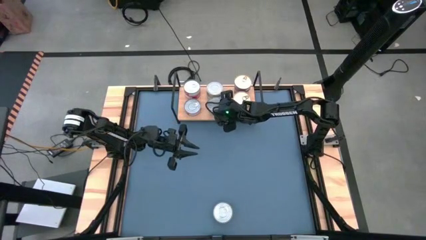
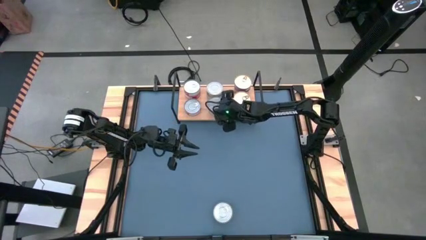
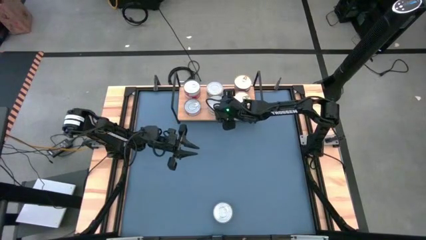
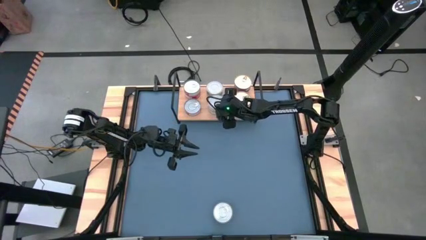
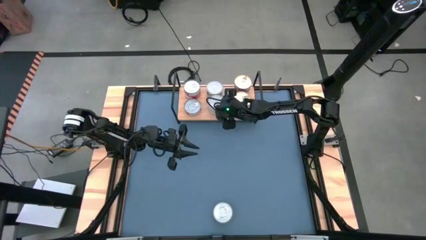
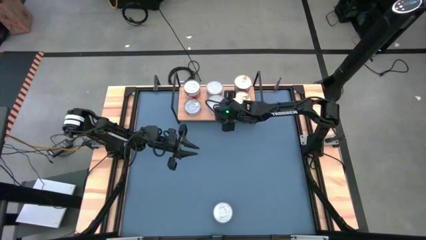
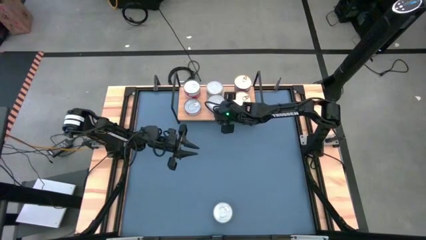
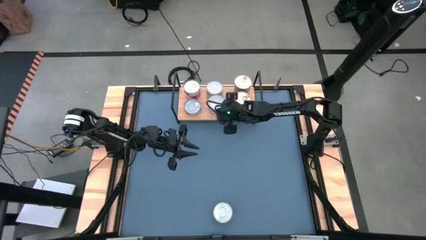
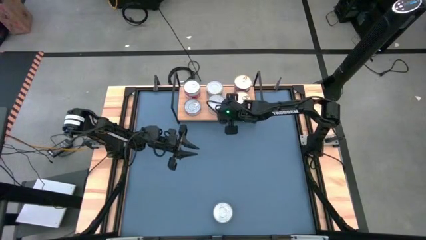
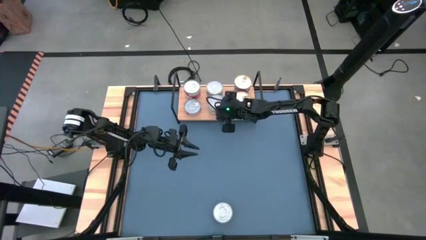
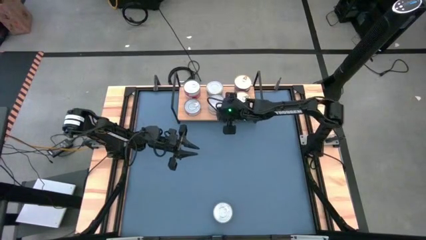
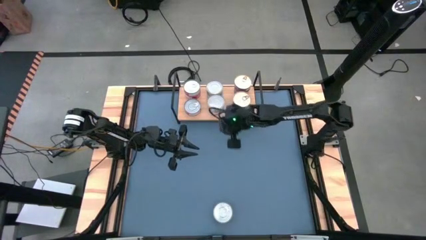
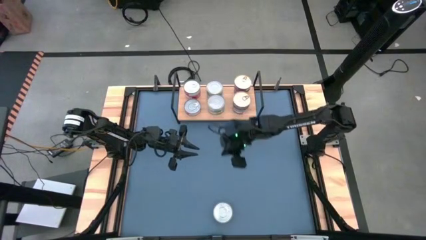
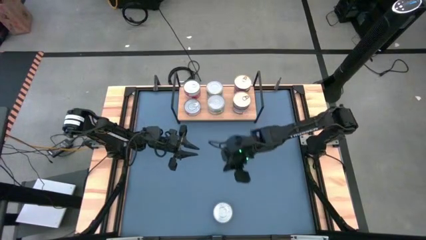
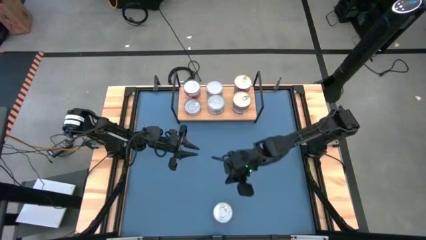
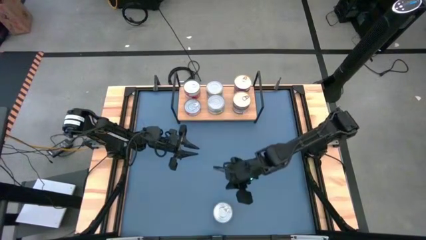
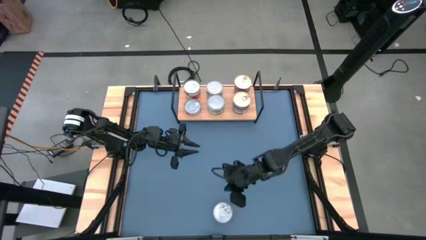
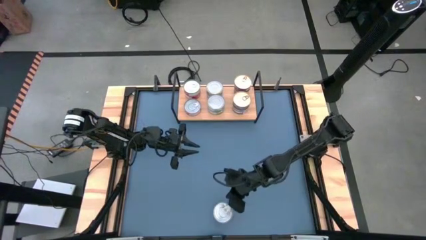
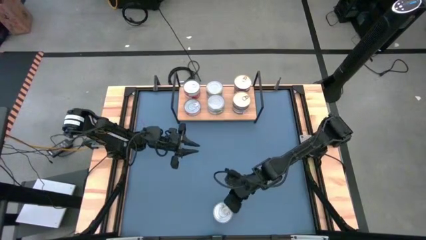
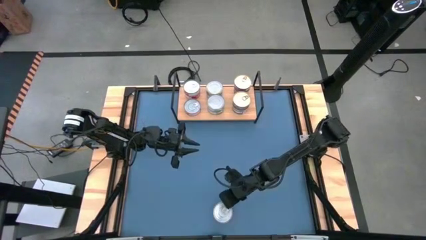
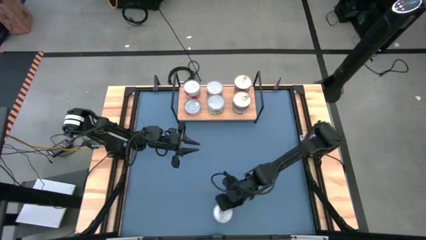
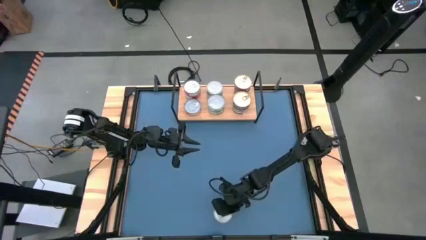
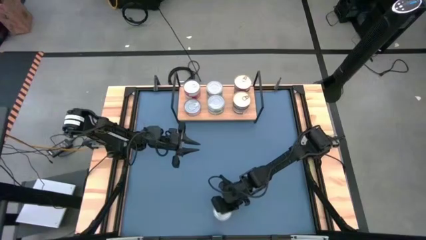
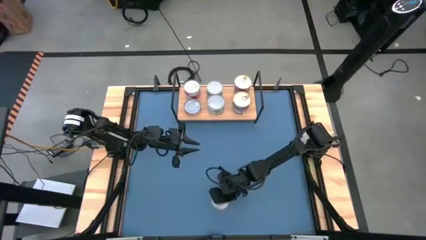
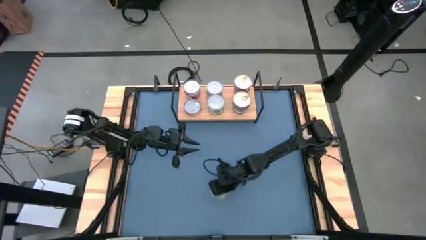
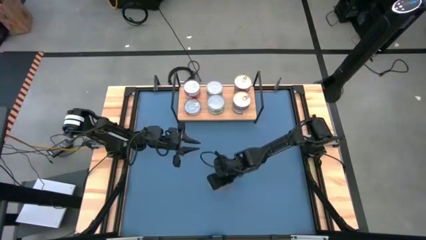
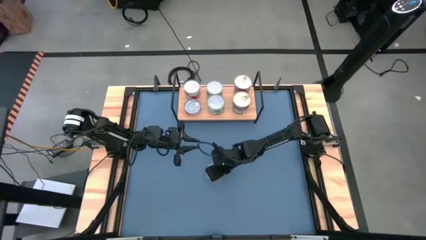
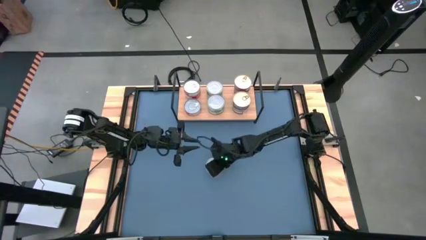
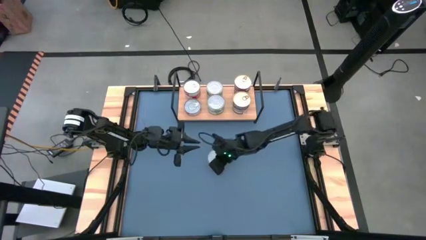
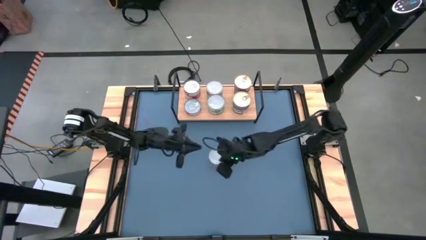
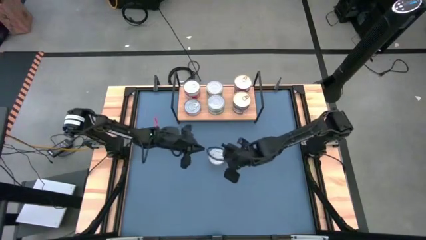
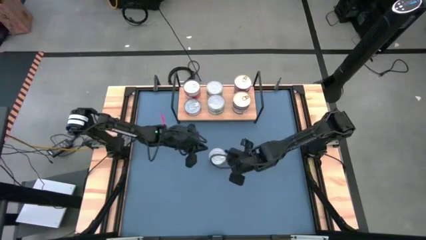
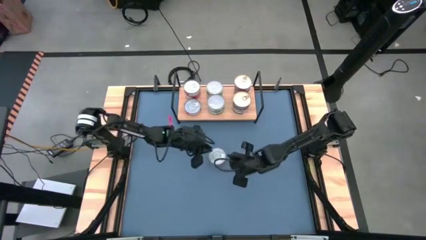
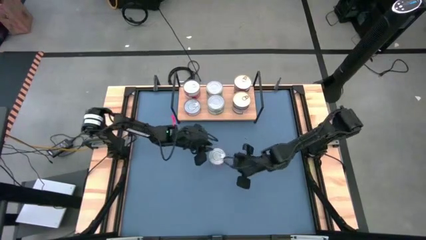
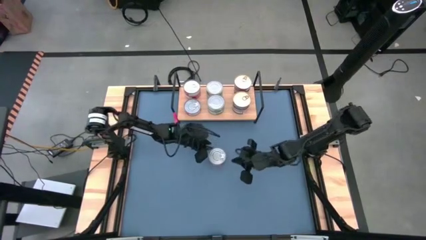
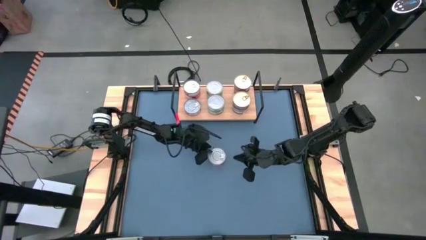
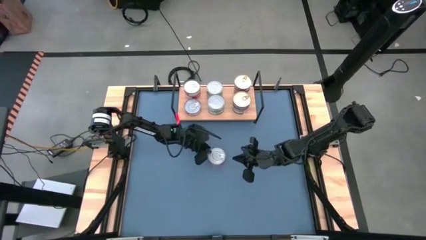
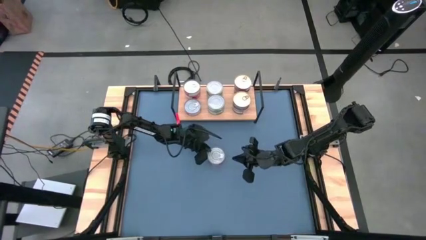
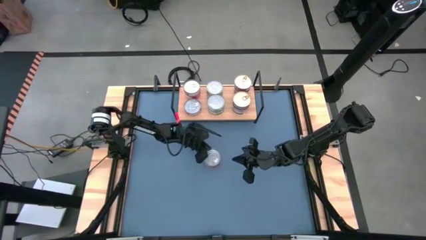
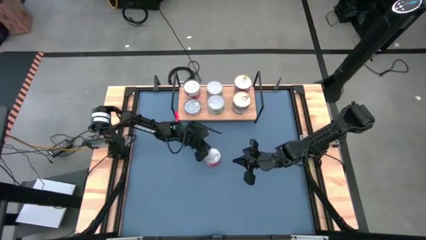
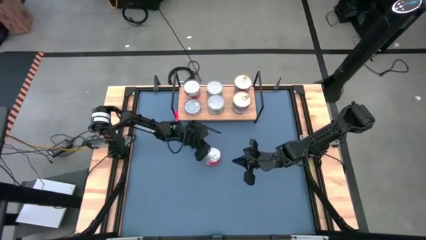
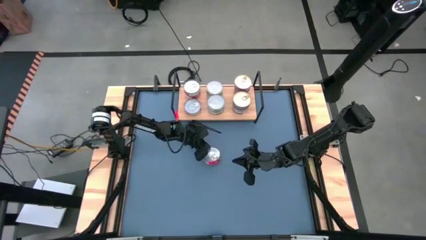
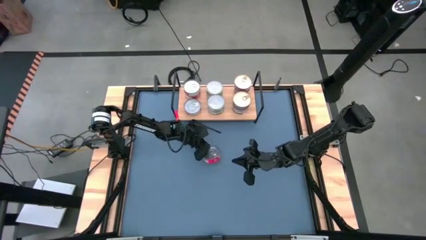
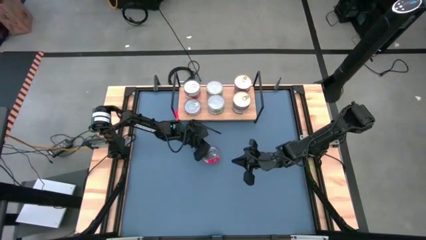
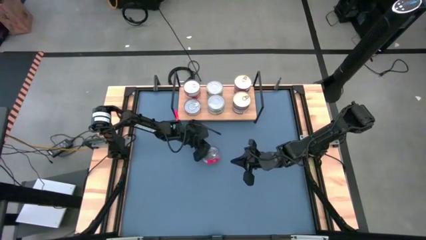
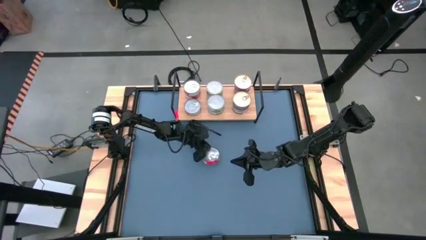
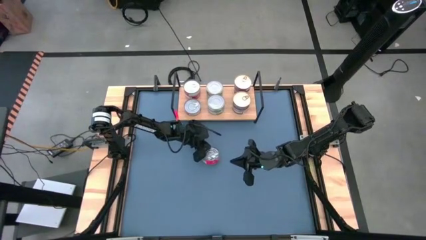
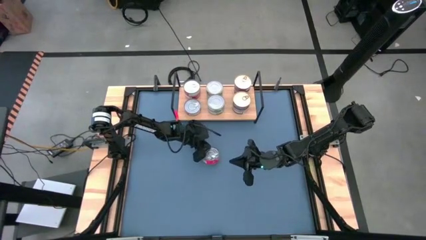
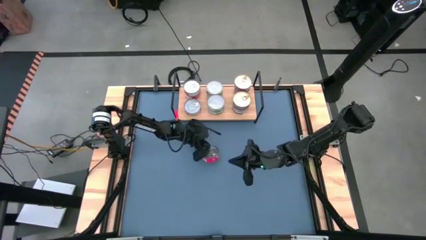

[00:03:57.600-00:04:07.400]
Task: Stack canned seafood by type on shelf
Stack the red tuna can on top of the red tuna can on the shelf

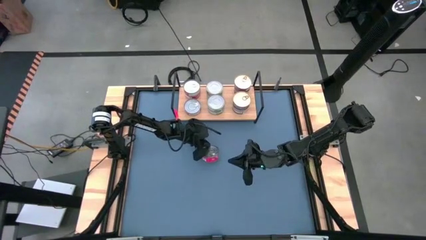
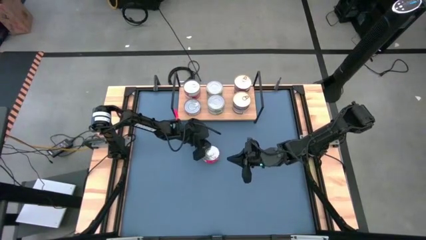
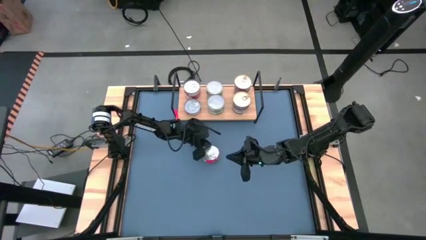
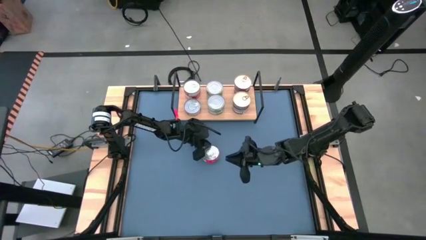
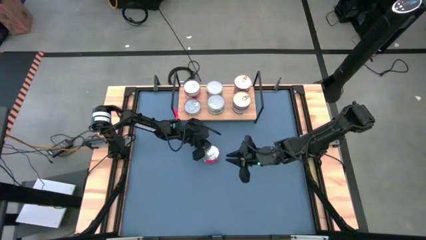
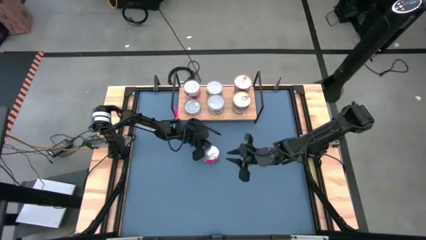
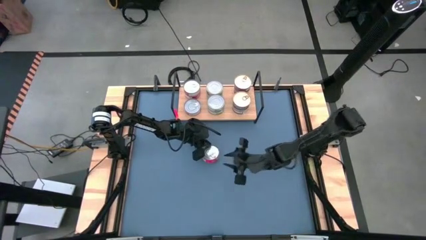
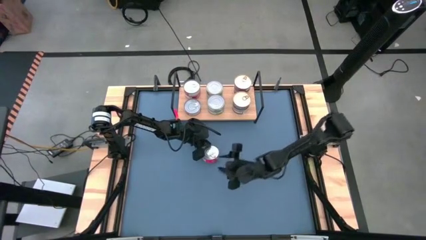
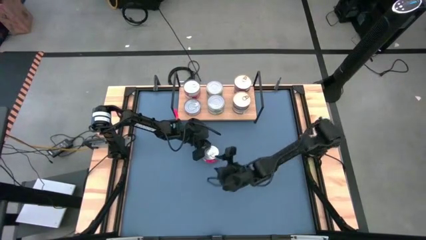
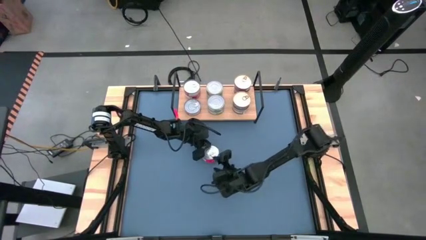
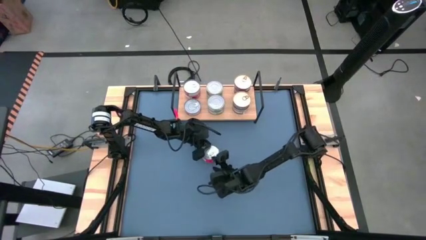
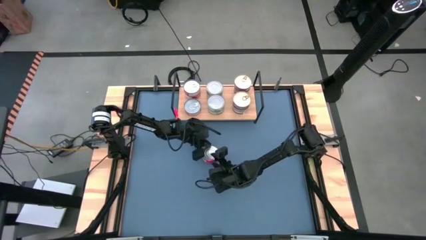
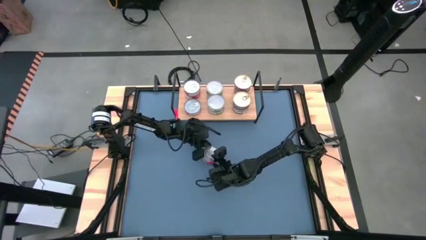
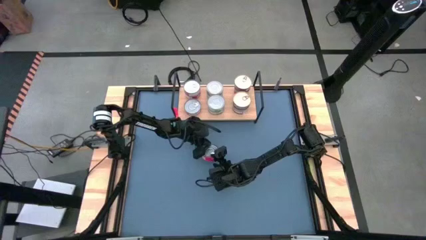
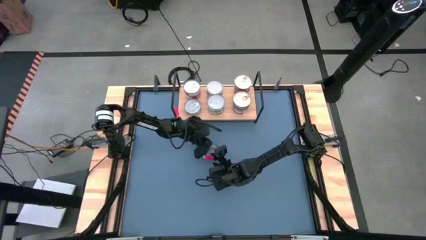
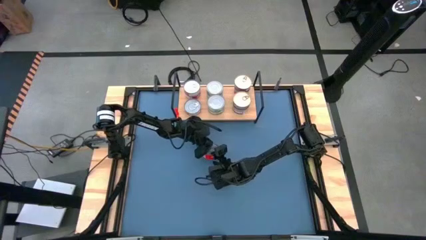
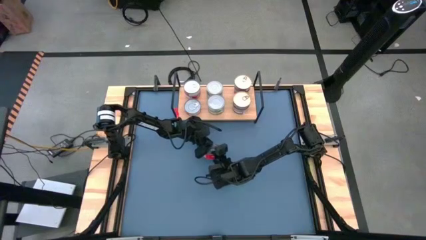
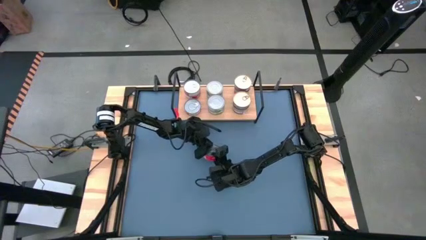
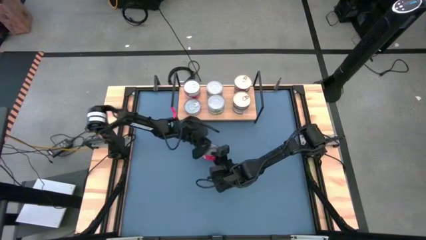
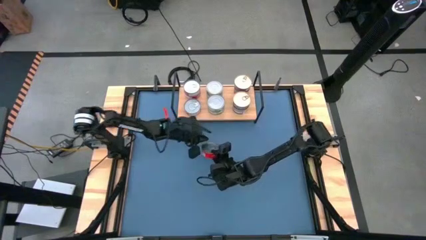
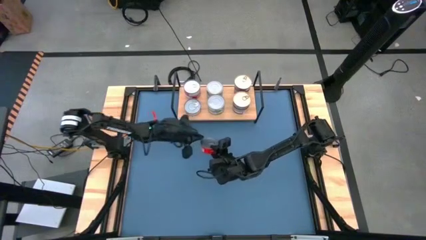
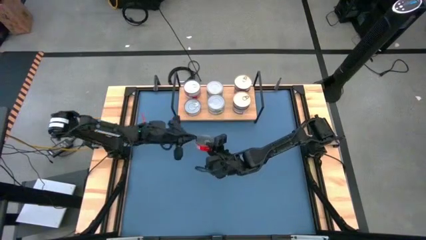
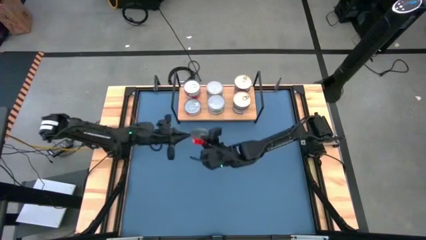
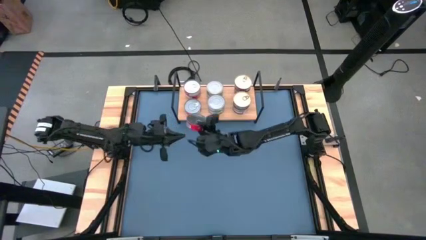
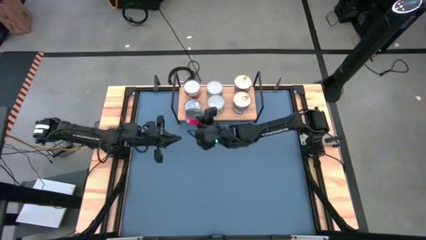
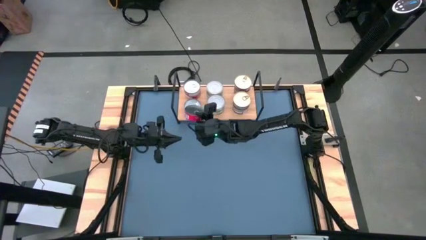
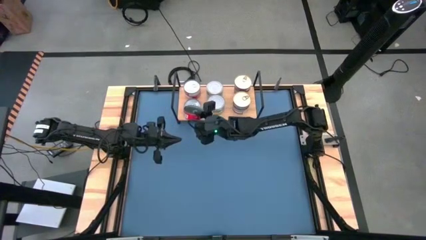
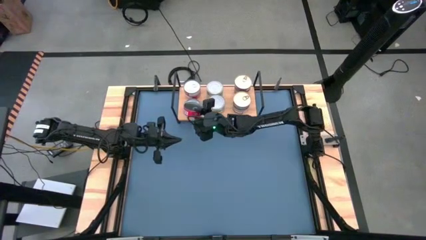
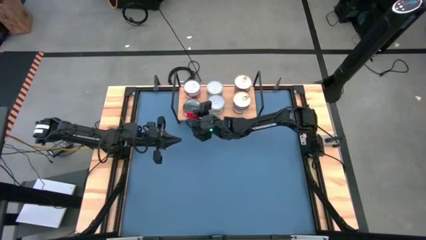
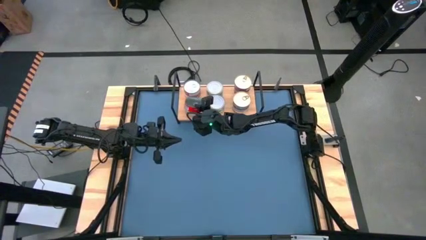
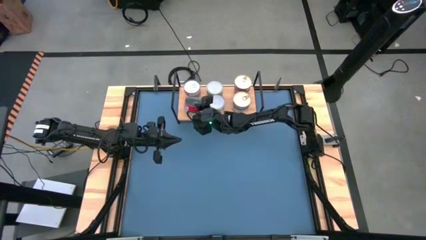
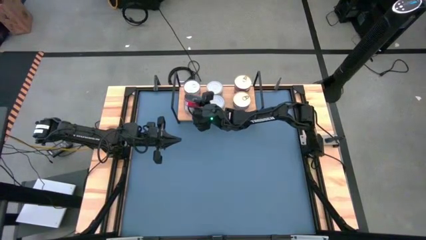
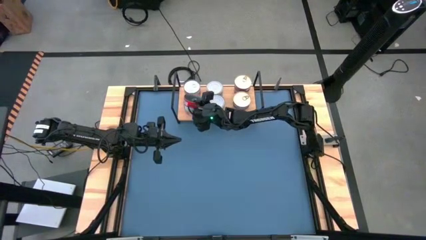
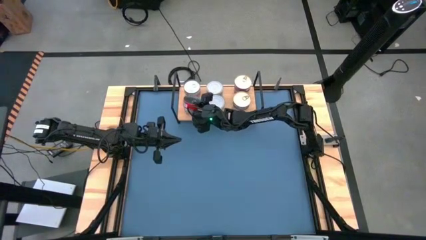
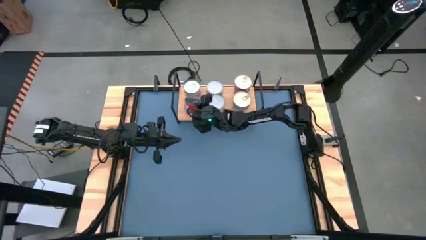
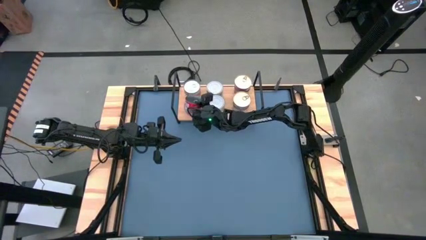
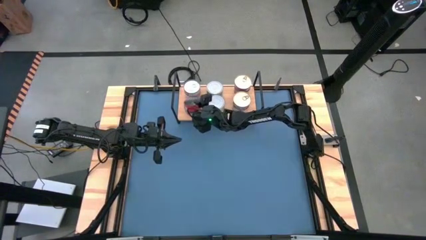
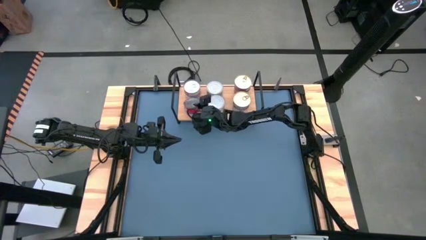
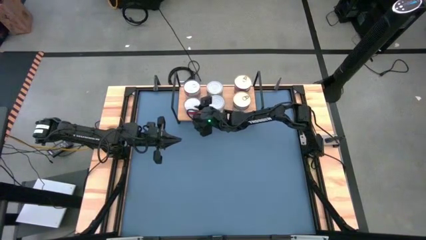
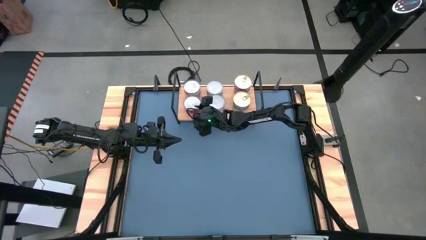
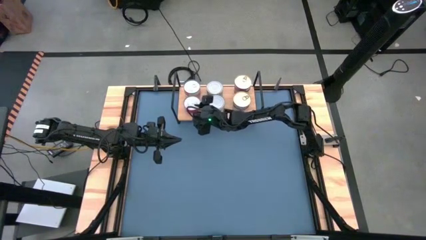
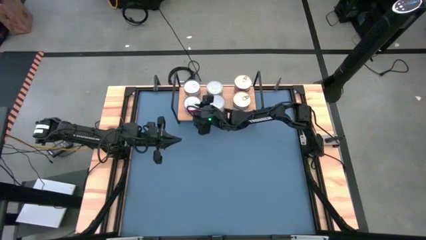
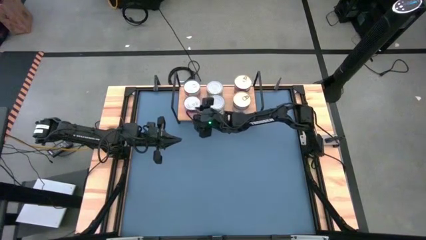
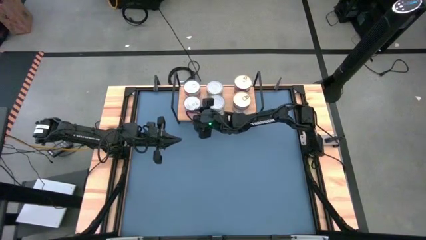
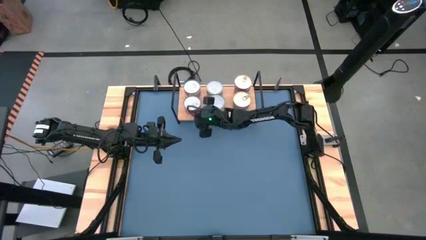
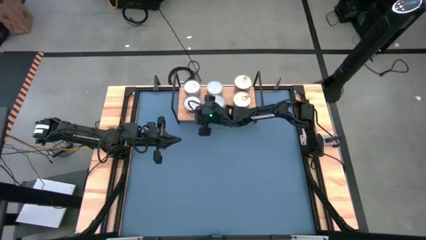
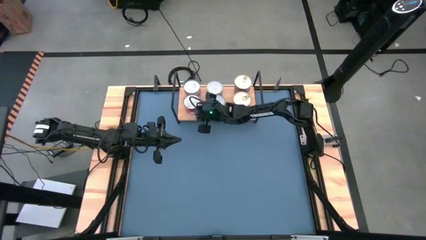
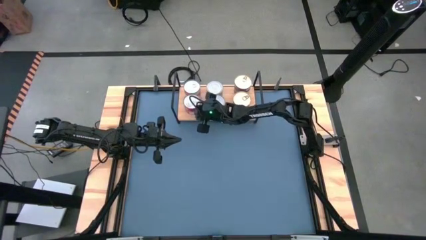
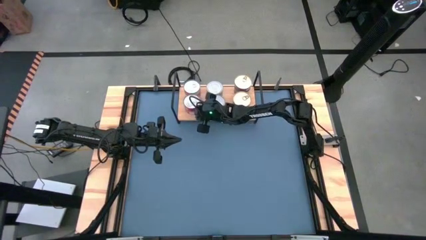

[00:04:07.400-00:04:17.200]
Stack the red tuna can on top of the red tuna can on the shelf
